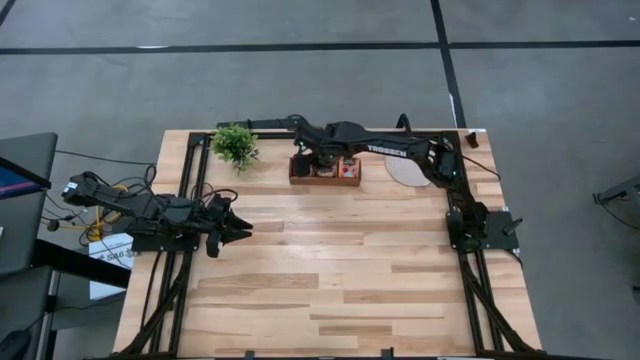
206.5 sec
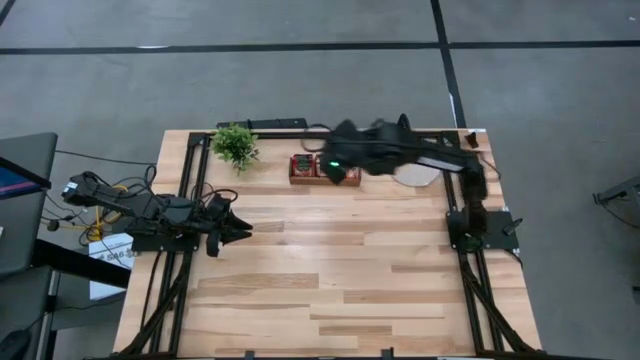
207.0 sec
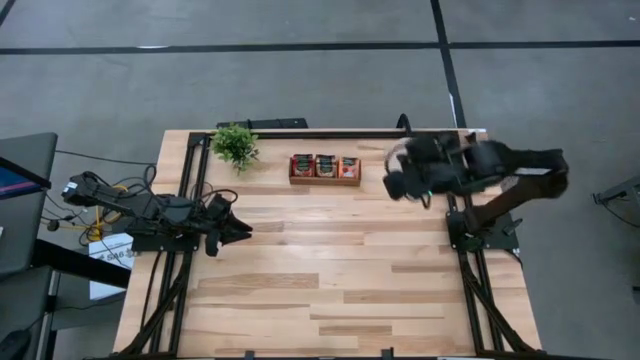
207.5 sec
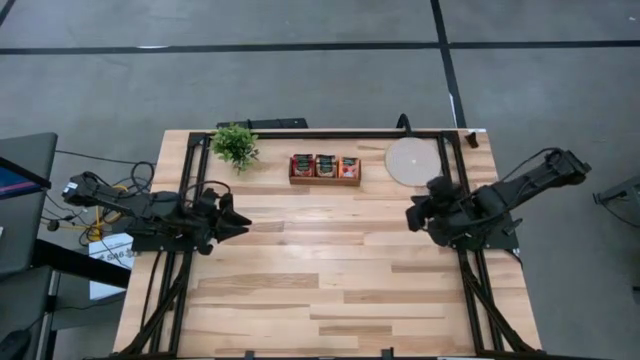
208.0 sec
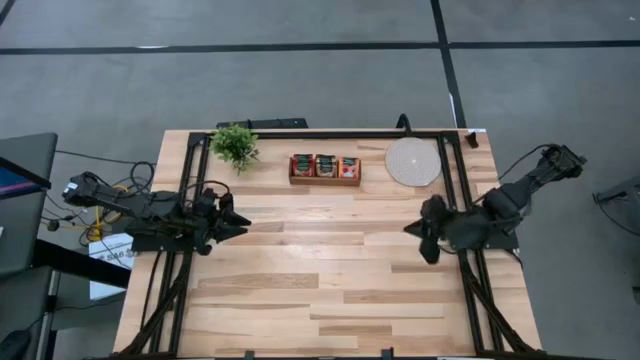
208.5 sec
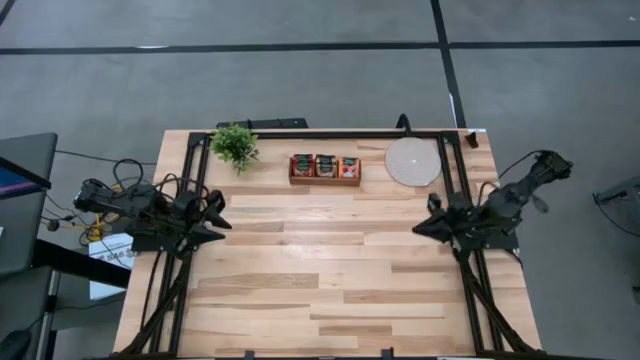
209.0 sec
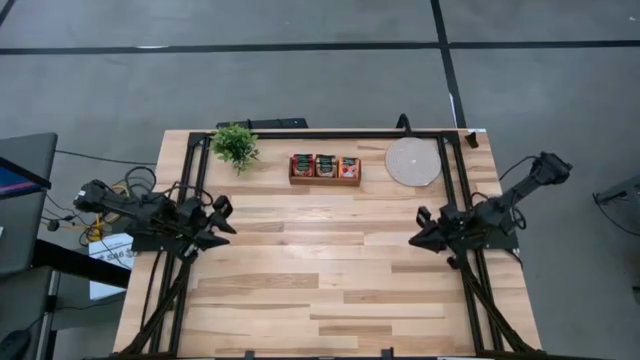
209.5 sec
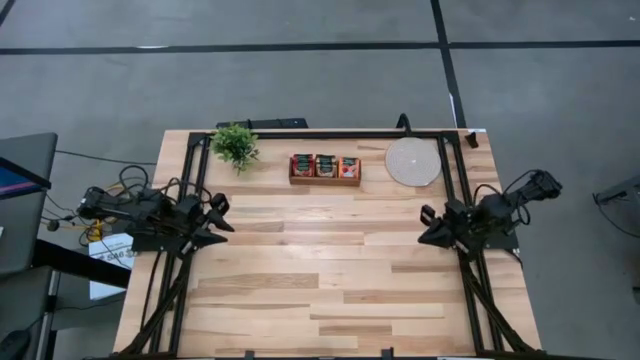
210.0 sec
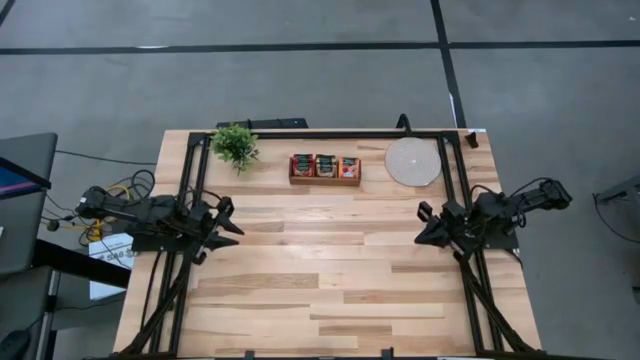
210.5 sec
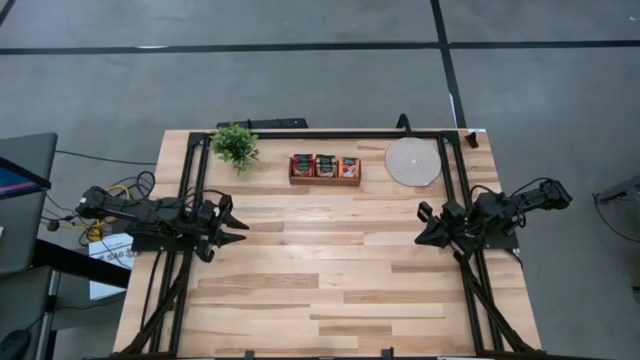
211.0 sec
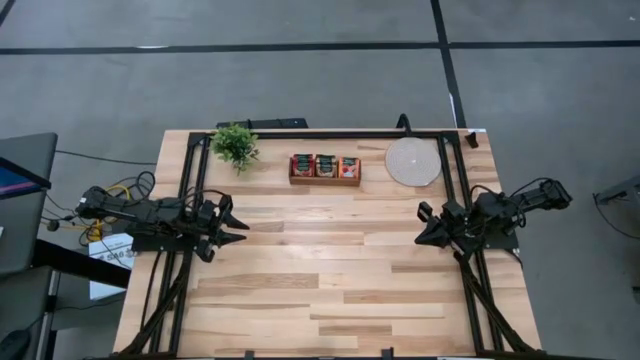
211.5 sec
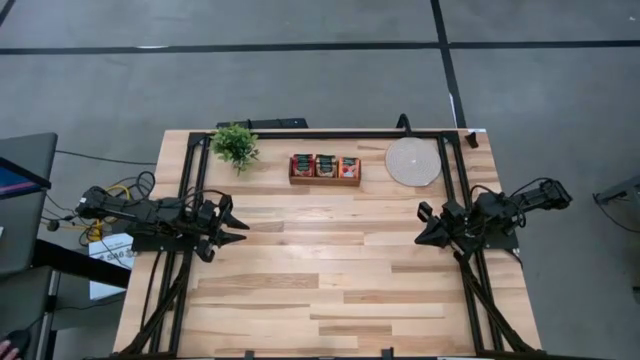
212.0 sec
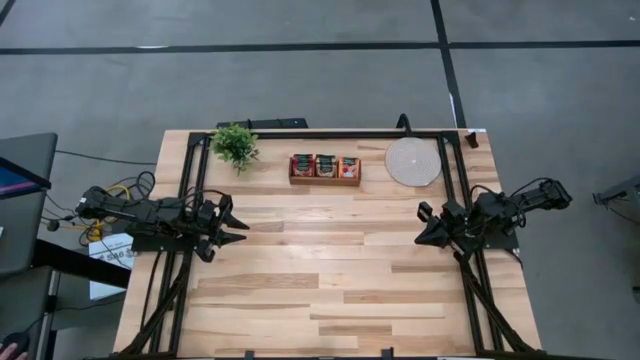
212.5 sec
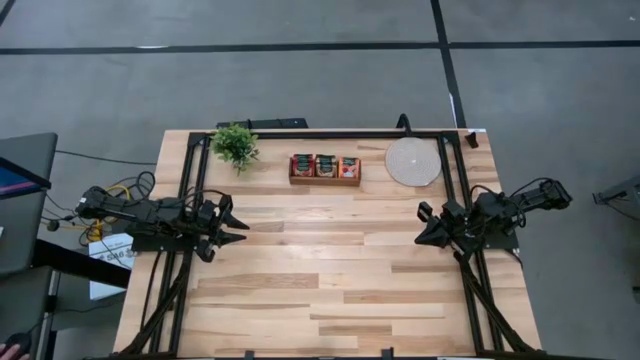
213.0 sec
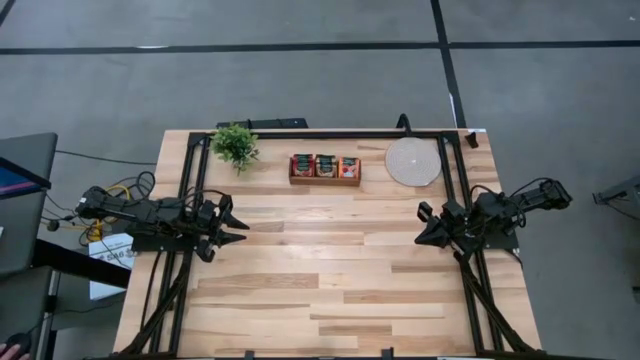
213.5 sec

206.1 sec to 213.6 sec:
Task: Pick & Place Tea
Return to Home Position

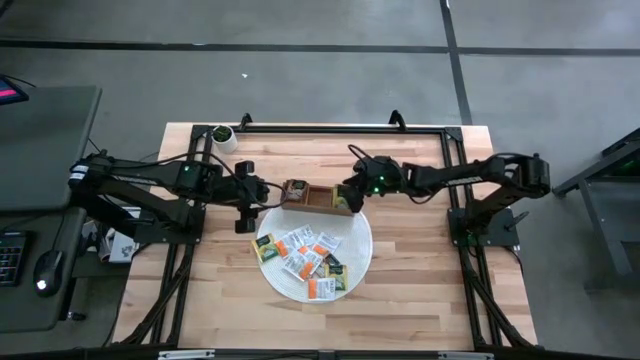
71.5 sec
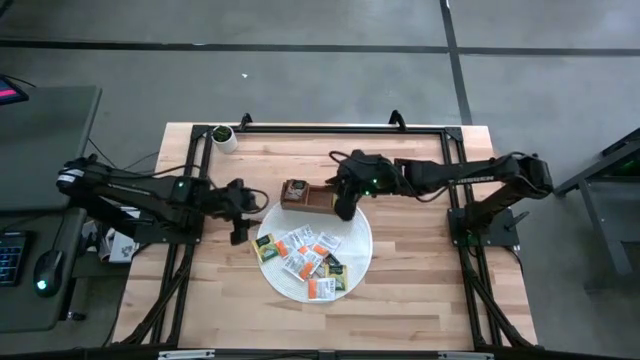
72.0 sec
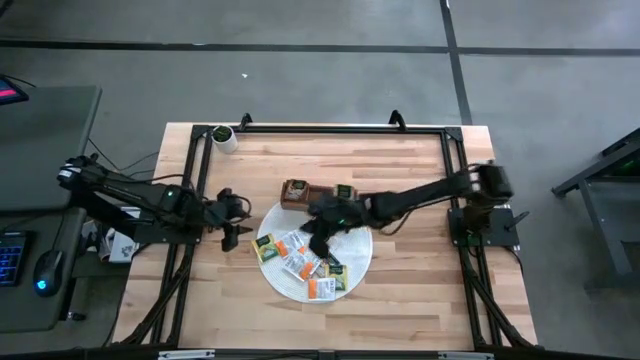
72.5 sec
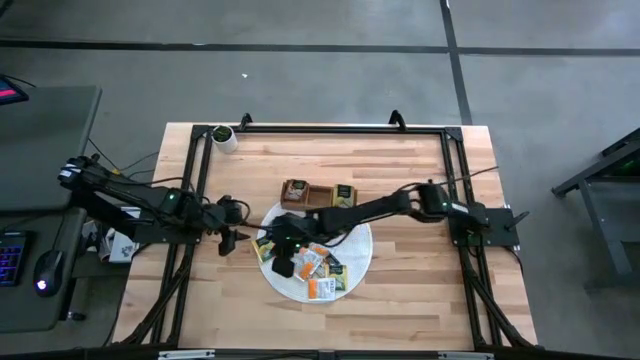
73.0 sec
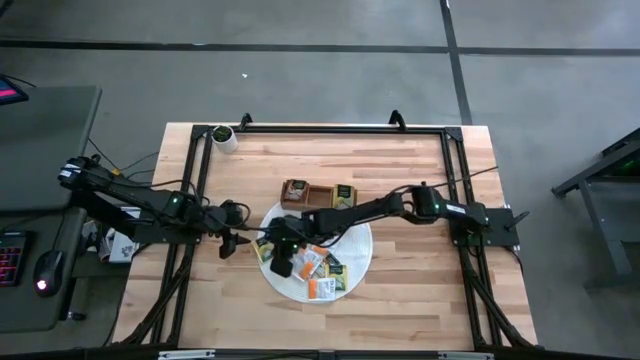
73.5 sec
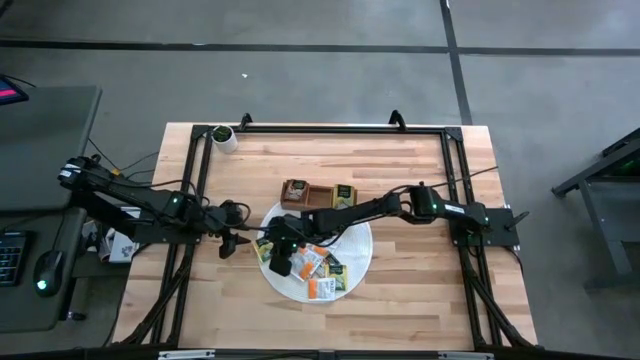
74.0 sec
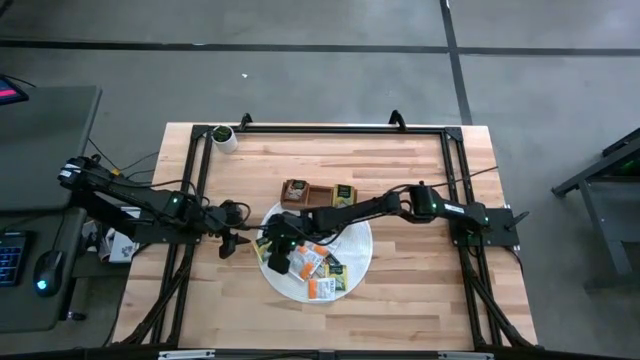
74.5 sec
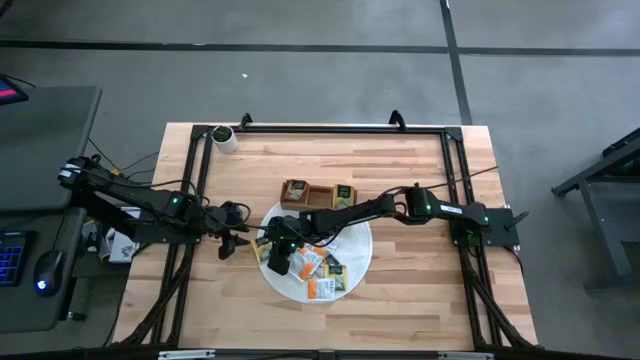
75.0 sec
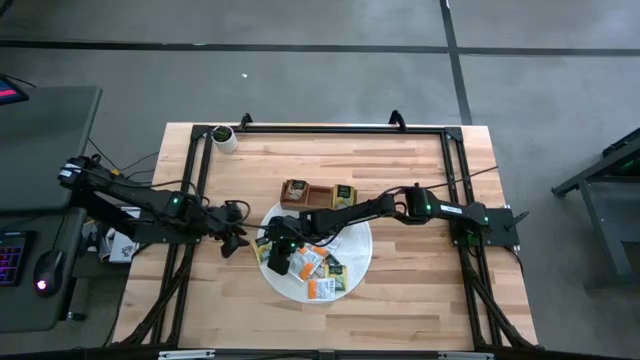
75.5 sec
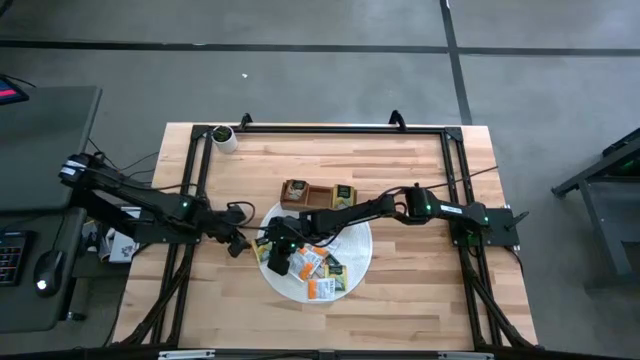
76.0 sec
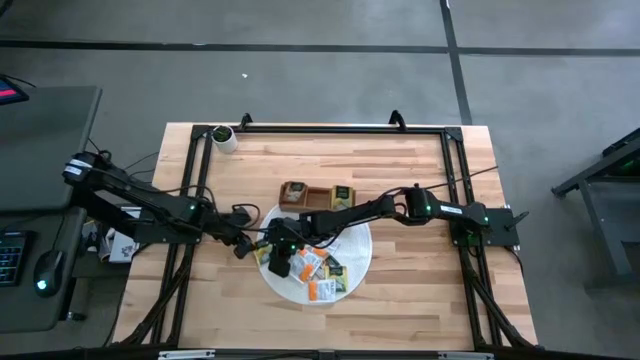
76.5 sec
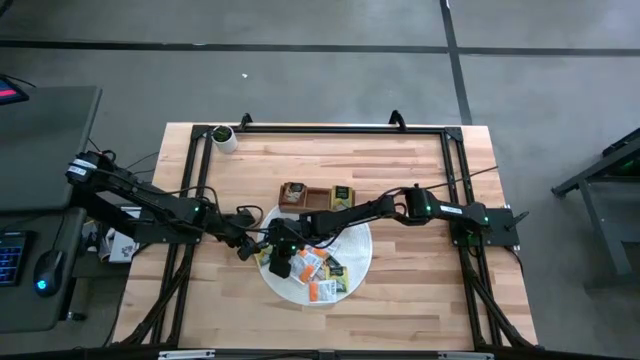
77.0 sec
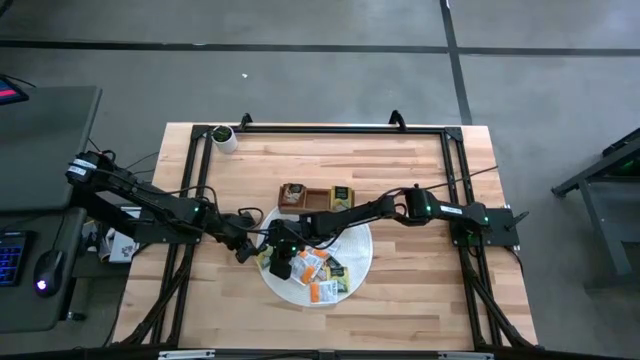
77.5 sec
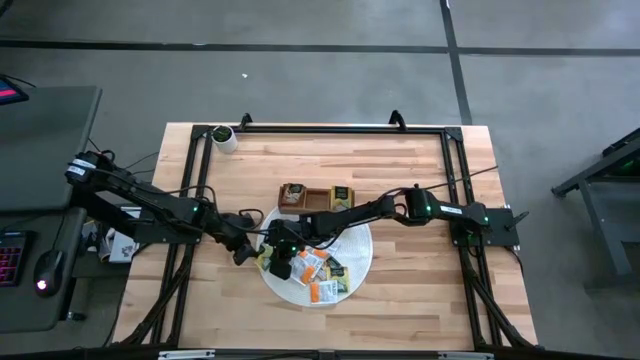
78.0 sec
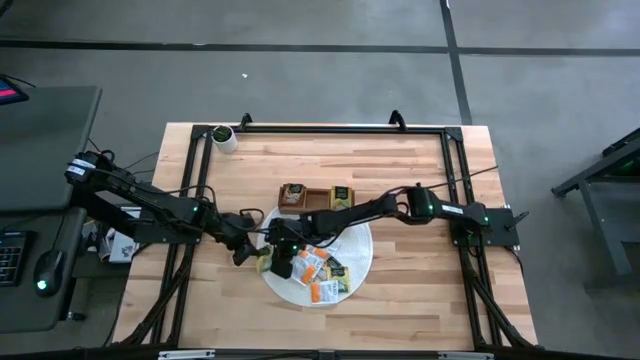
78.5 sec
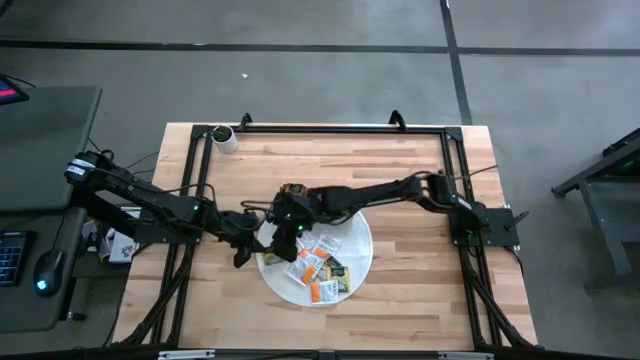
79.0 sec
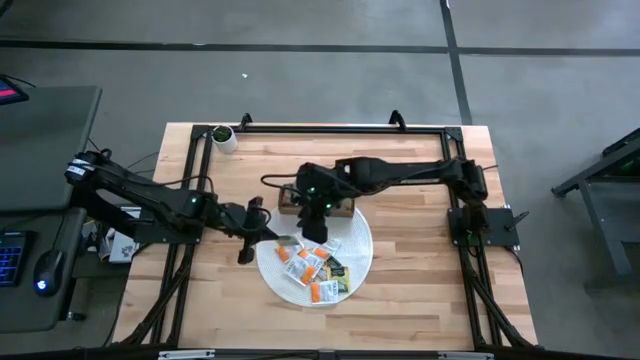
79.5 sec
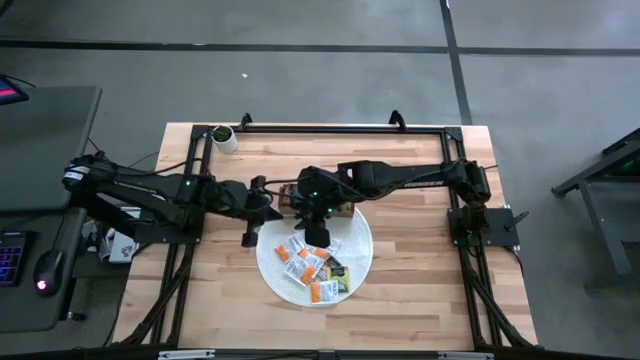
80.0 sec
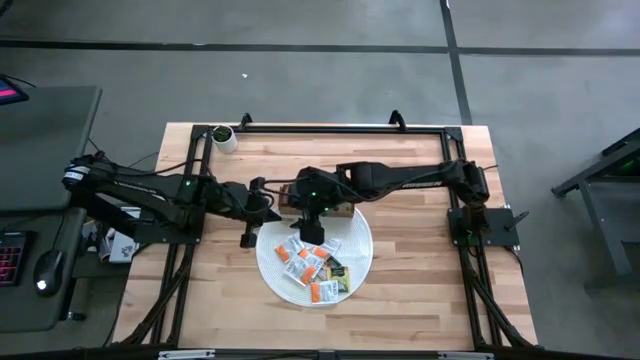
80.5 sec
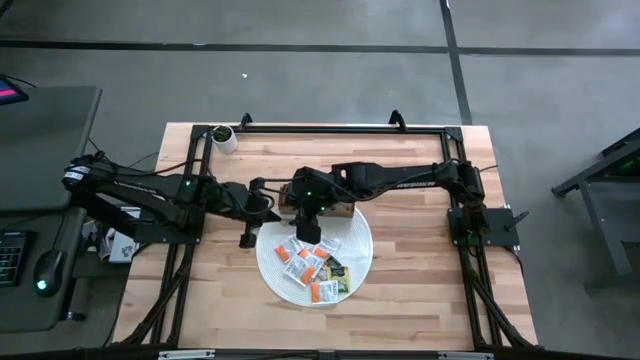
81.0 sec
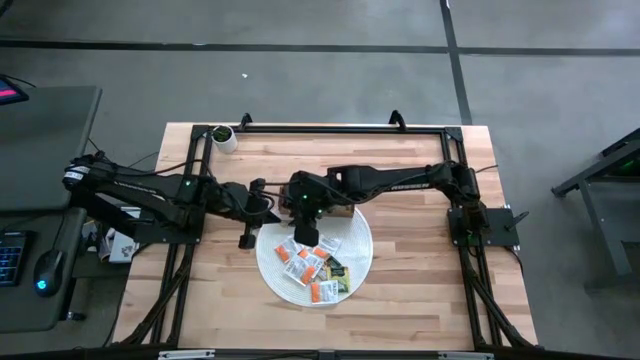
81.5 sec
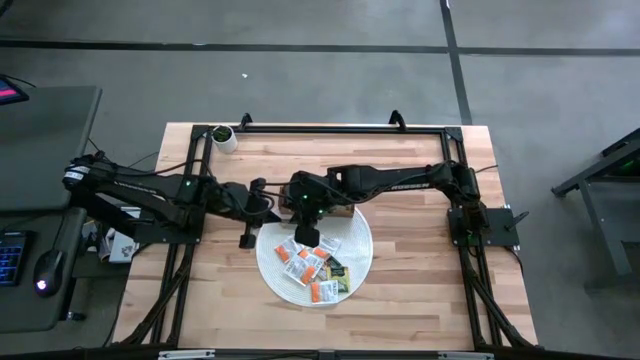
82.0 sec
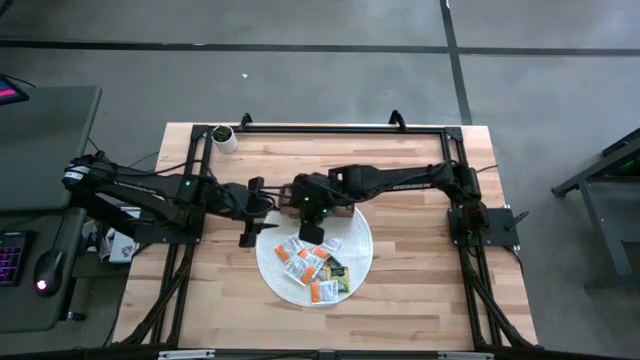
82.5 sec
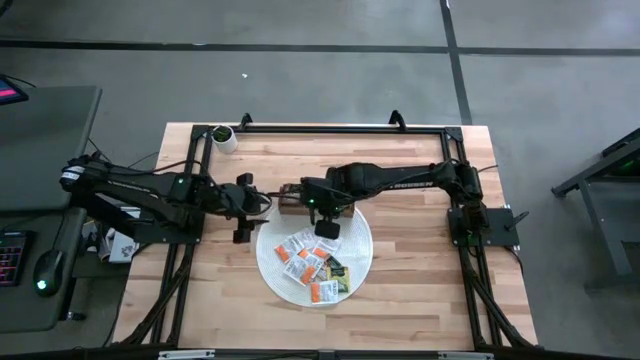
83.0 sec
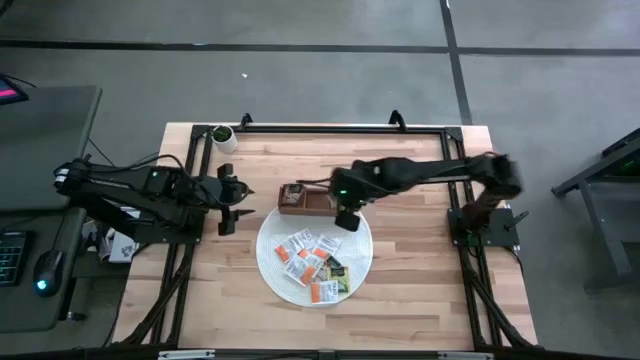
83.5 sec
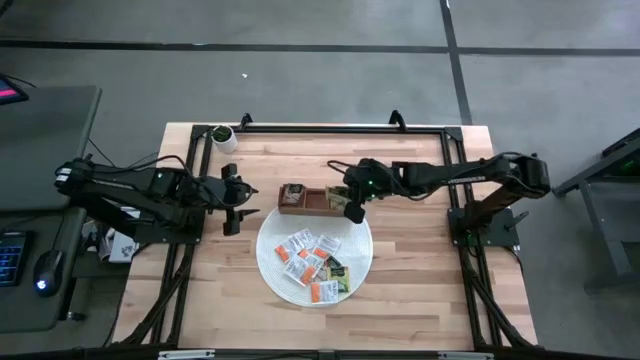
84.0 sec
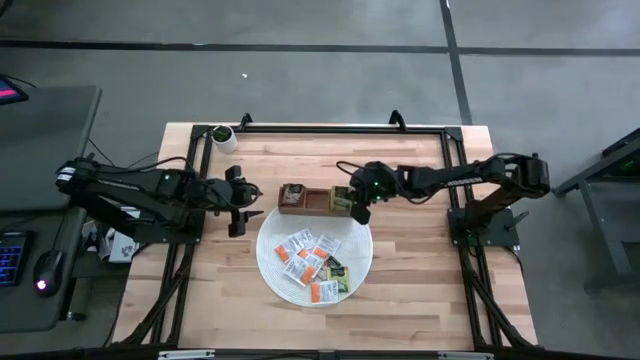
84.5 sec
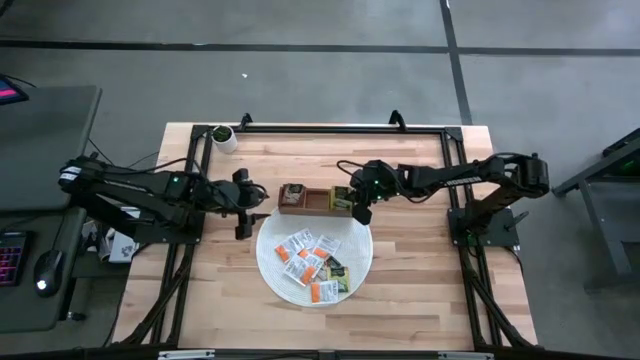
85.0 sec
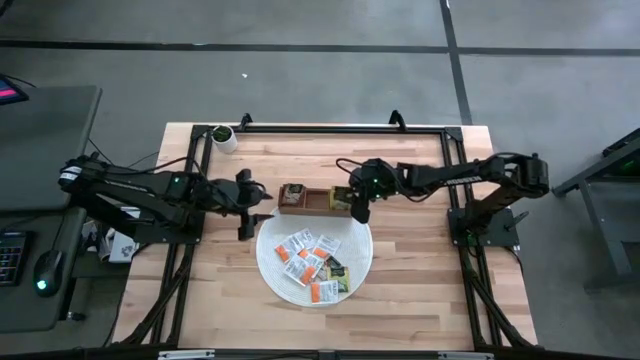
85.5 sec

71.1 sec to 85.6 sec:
Task: Pick & Place Tea
Put the yellow tea bag into the right section of the wooden organizer
